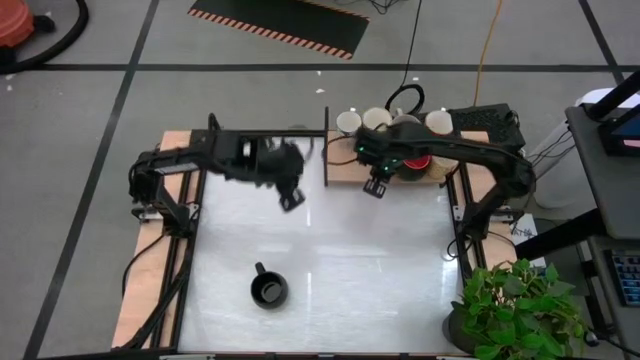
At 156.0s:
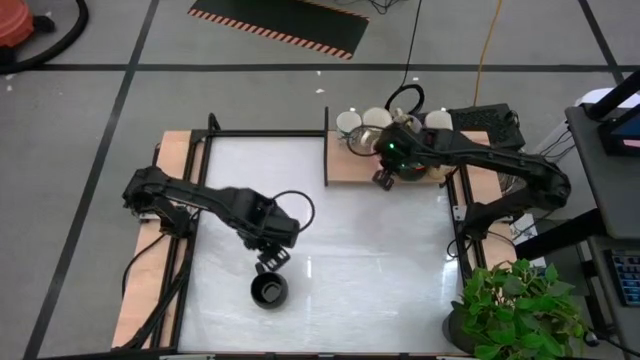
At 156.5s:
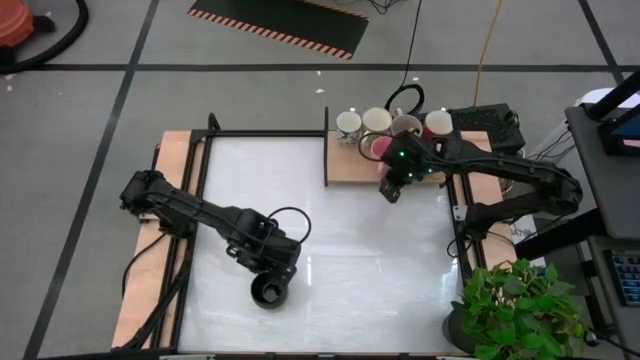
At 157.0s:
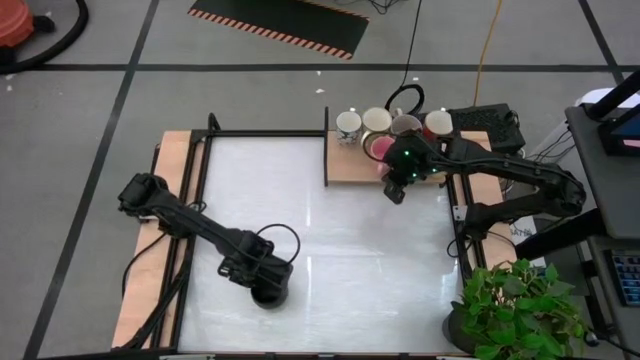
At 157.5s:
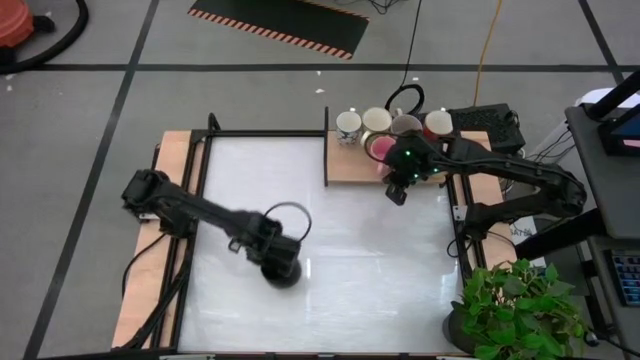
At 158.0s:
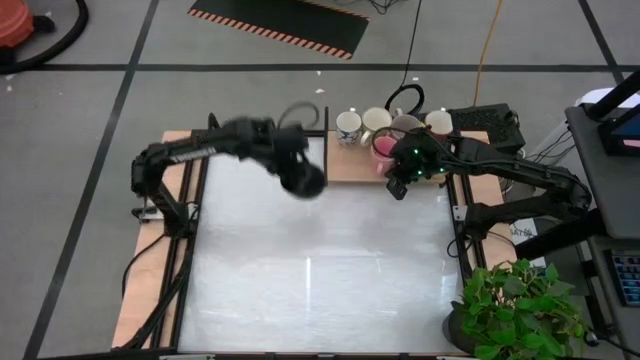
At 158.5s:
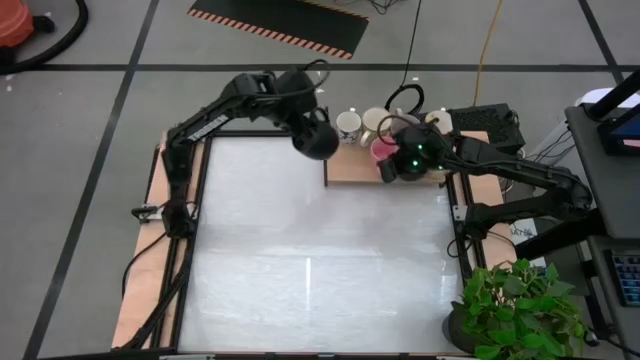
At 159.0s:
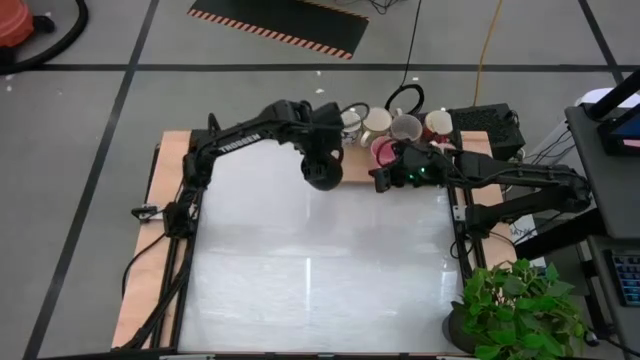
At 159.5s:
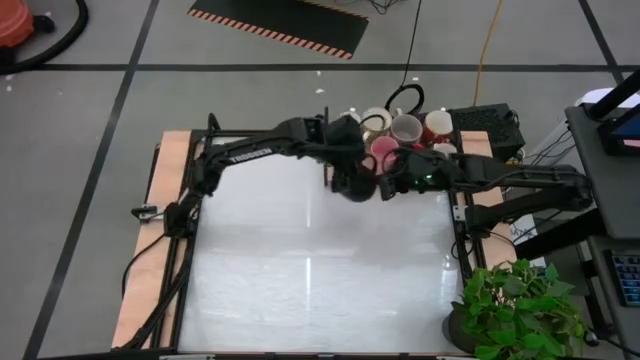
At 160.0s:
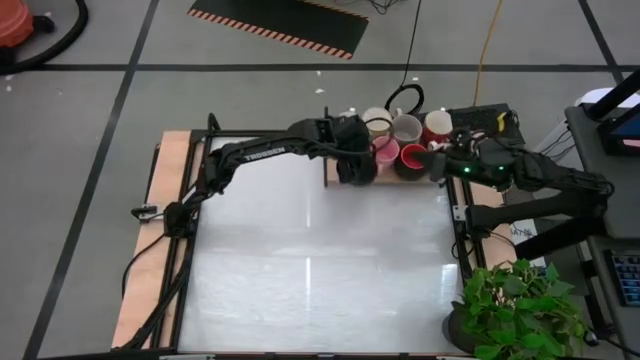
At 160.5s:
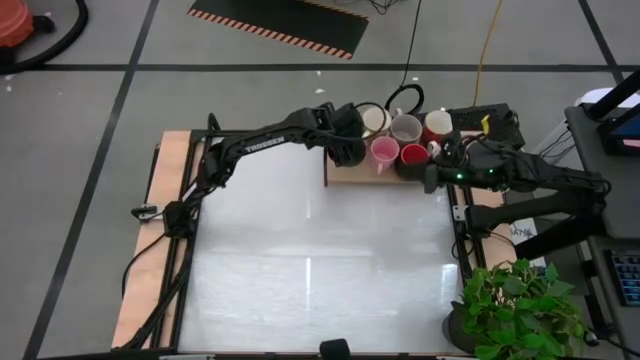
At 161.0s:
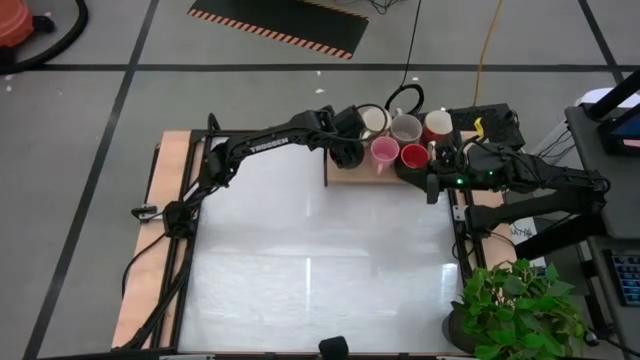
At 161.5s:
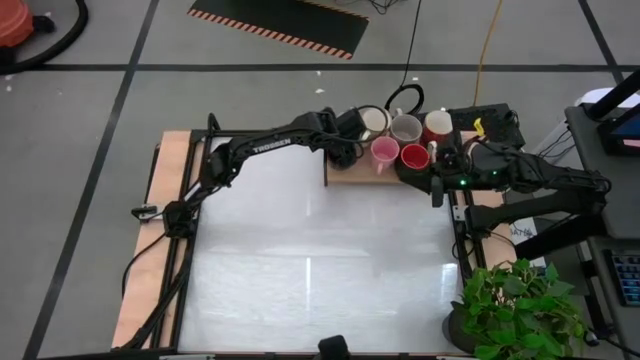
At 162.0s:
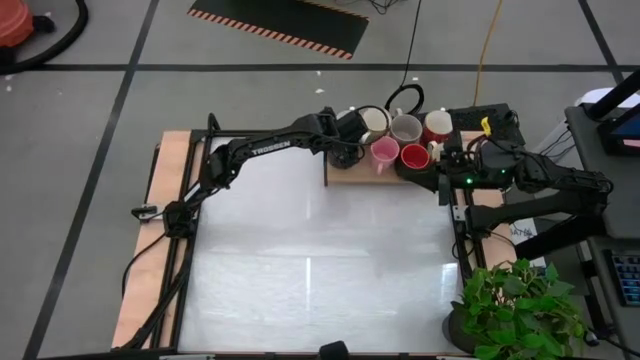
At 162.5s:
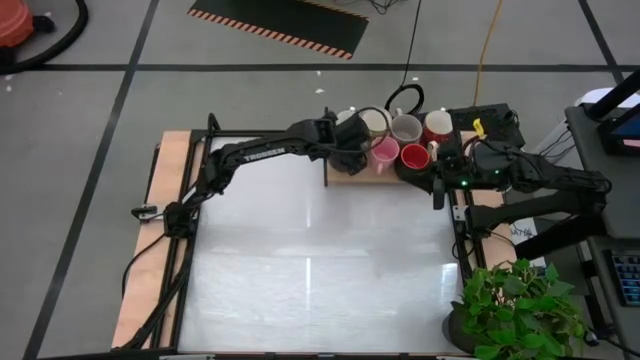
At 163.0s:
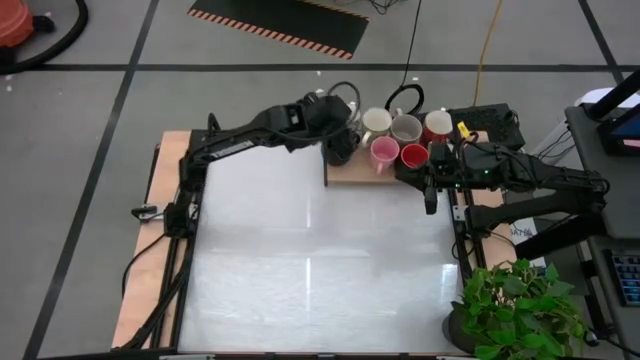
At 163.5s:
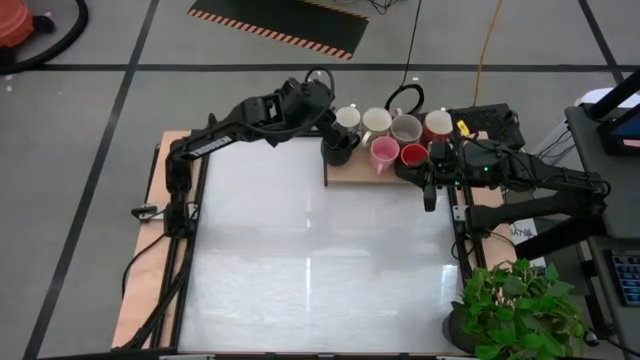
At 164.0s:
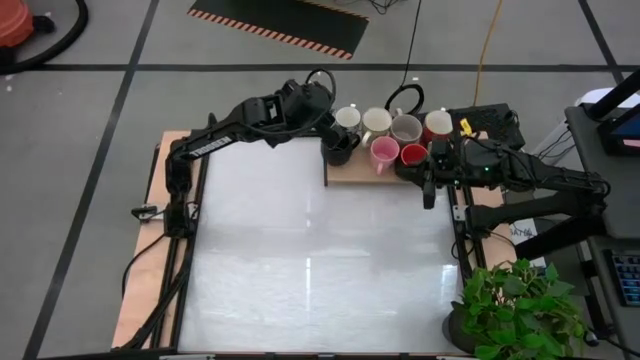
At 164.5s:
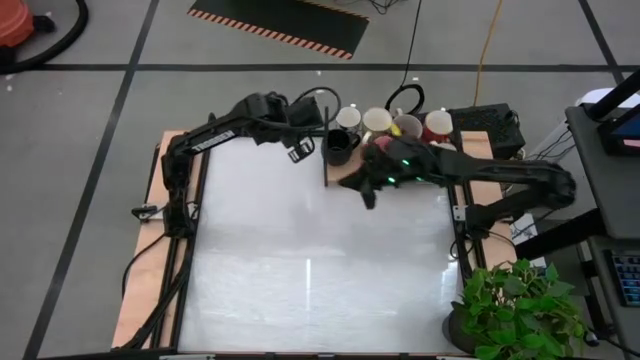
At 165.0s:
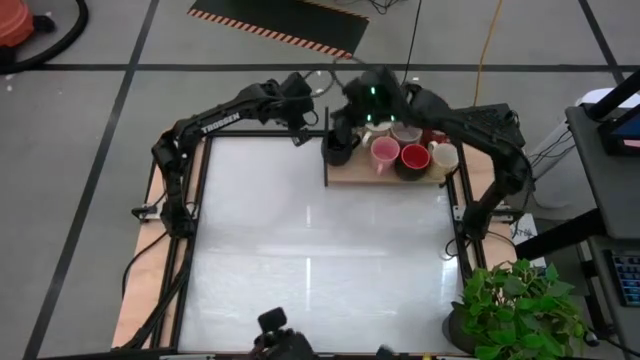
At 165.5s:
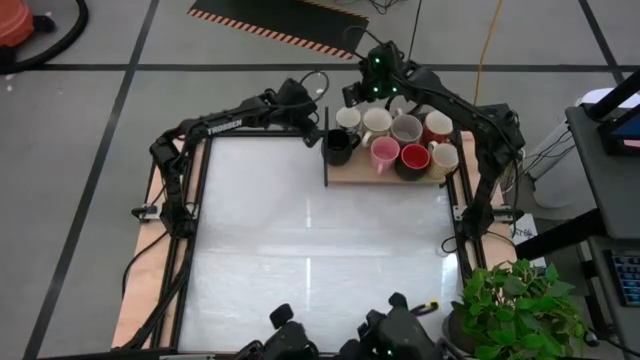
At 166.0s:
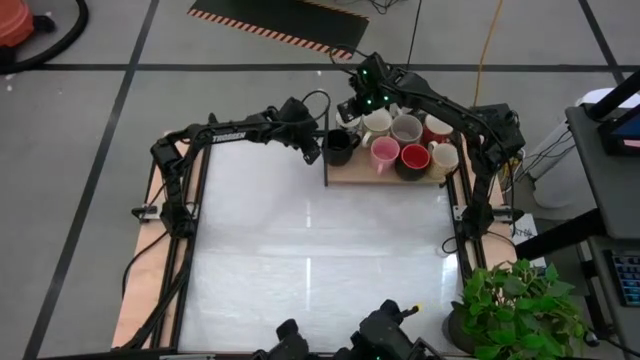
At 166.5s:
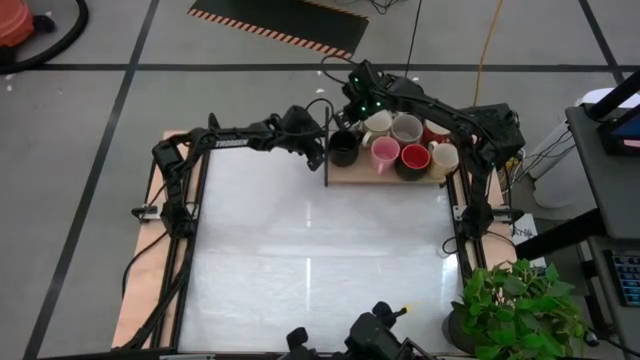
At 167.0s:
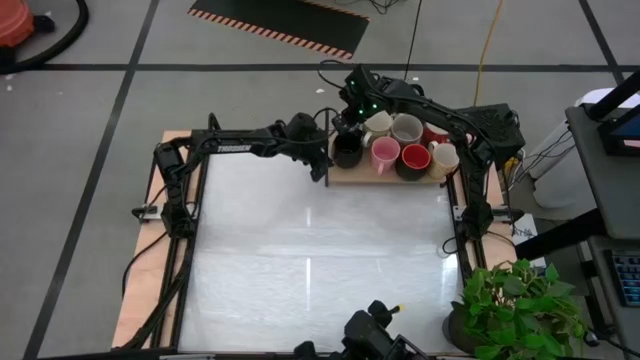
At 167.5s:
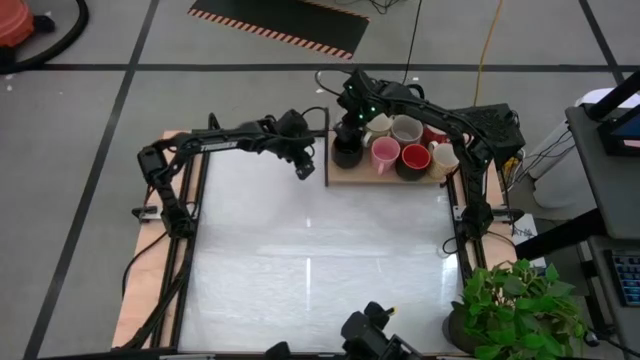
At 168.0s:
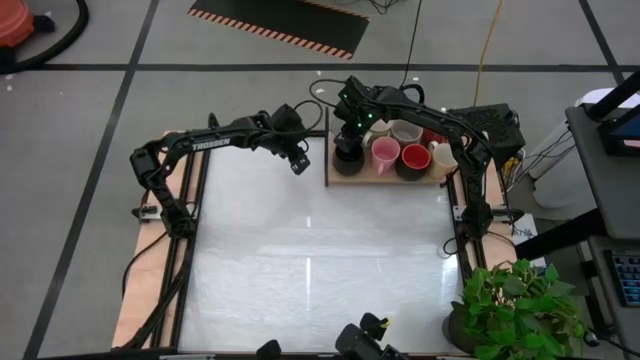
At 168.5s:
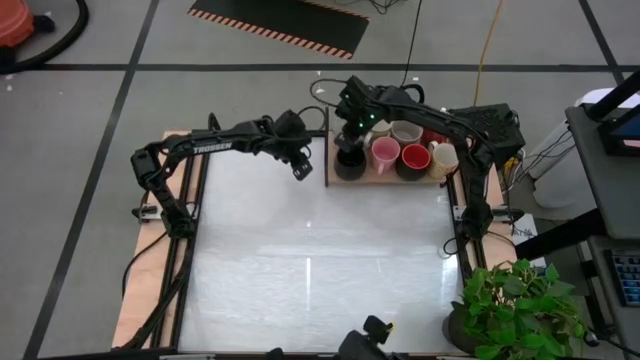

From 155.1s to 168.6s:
Task: Place coffee mugs
Put the black mug on the shelf

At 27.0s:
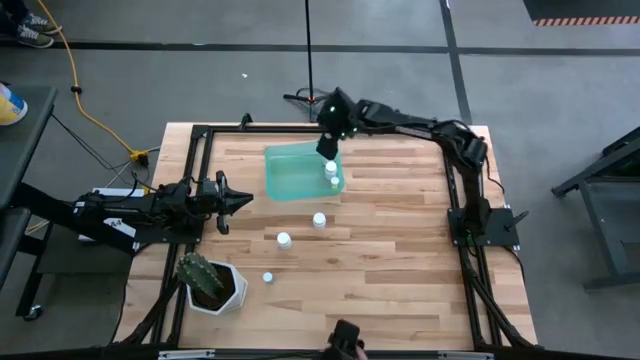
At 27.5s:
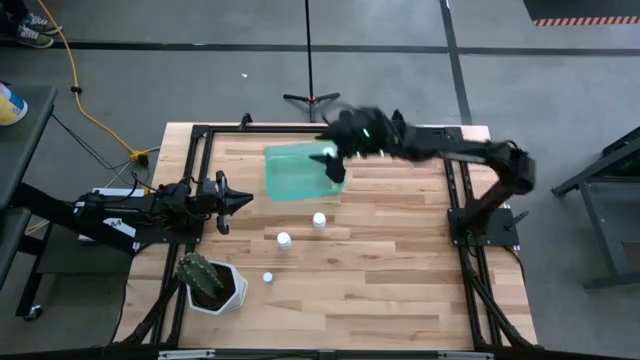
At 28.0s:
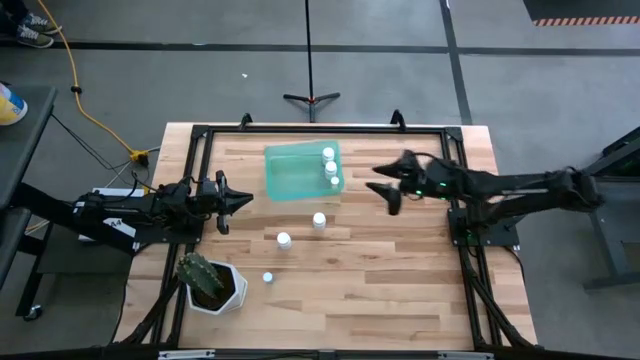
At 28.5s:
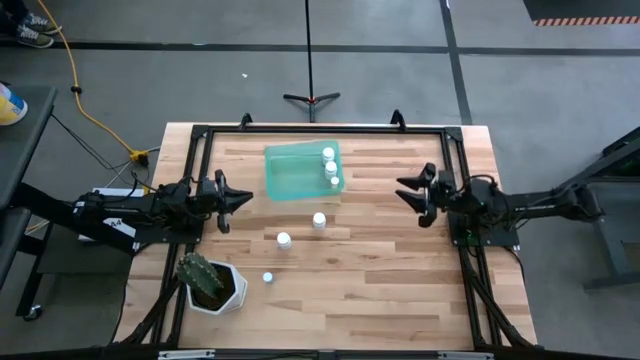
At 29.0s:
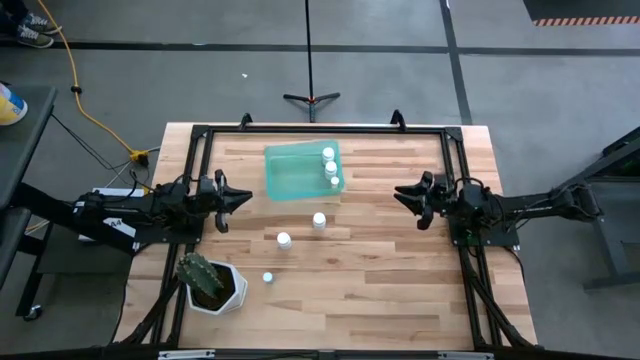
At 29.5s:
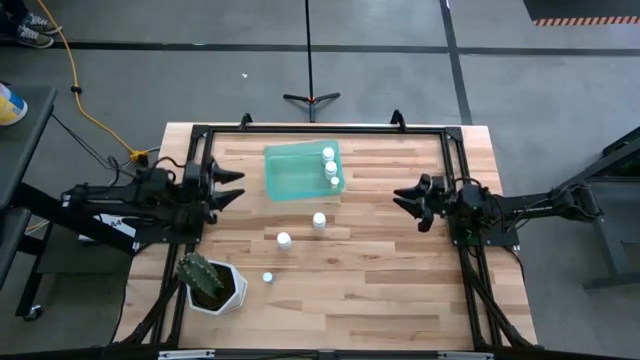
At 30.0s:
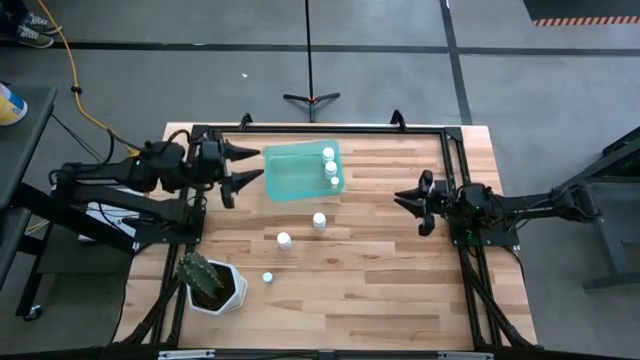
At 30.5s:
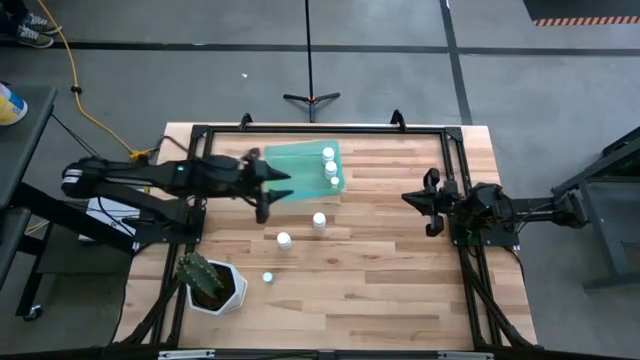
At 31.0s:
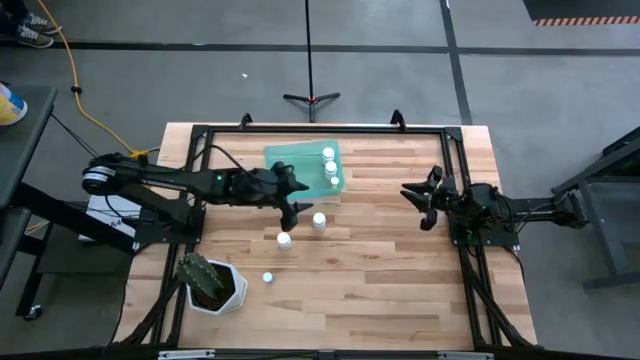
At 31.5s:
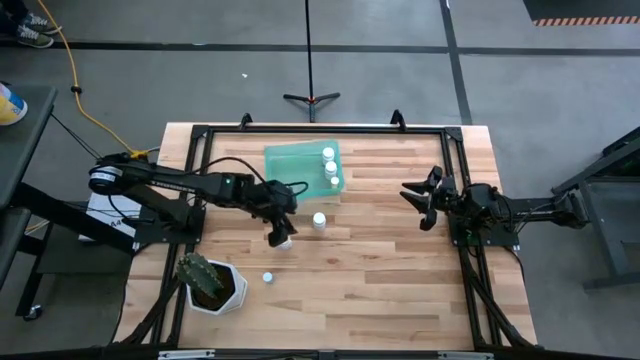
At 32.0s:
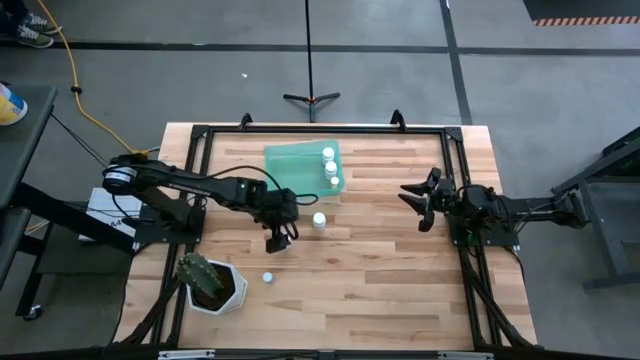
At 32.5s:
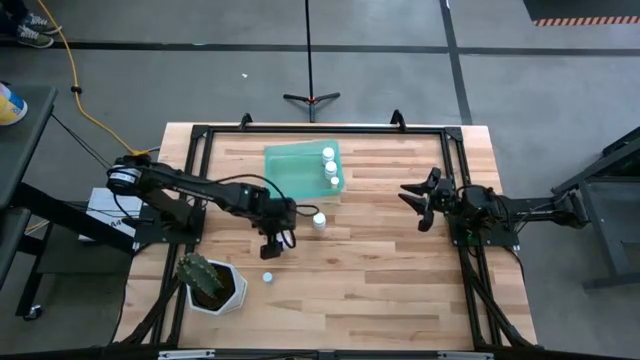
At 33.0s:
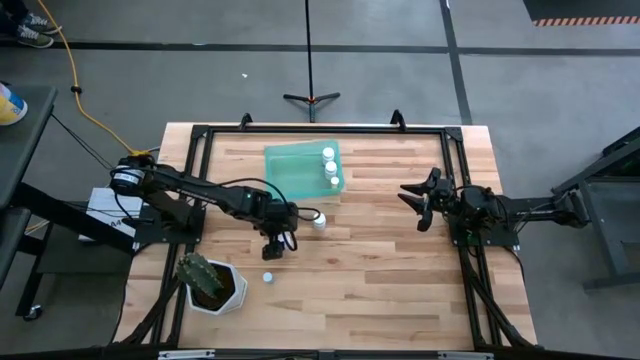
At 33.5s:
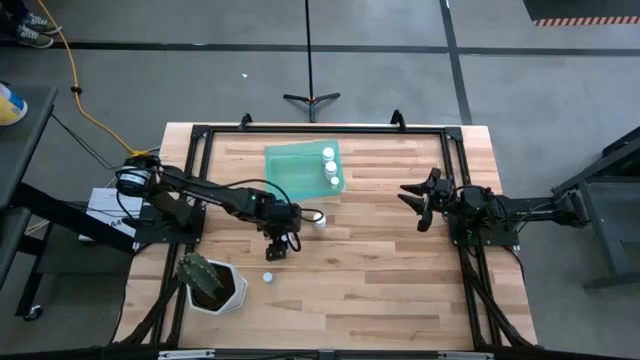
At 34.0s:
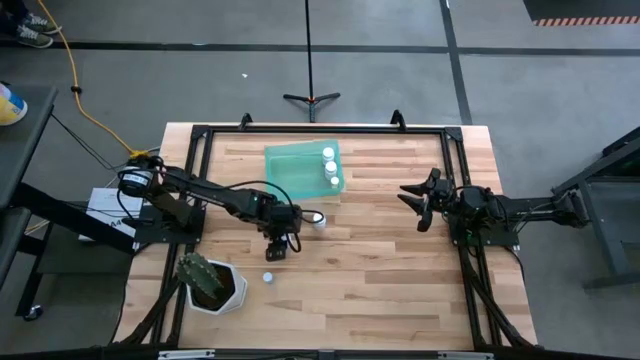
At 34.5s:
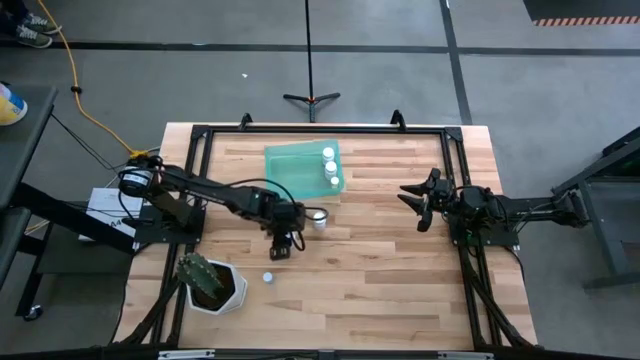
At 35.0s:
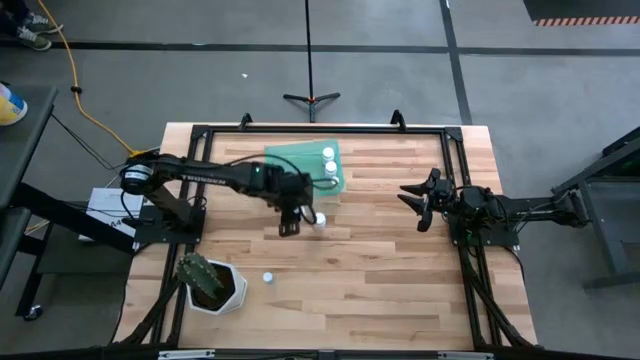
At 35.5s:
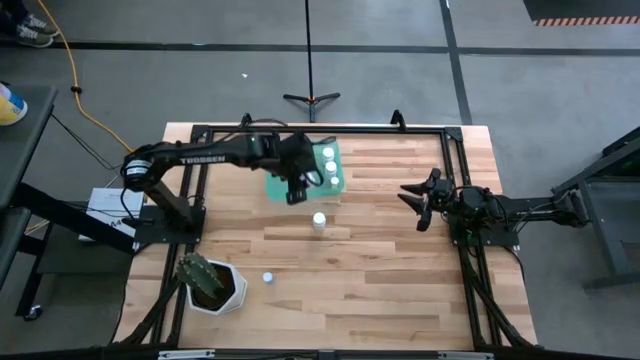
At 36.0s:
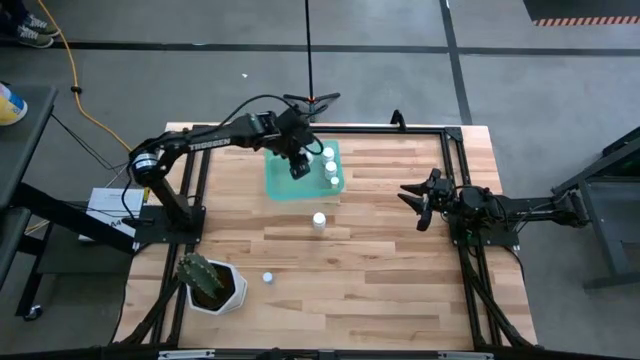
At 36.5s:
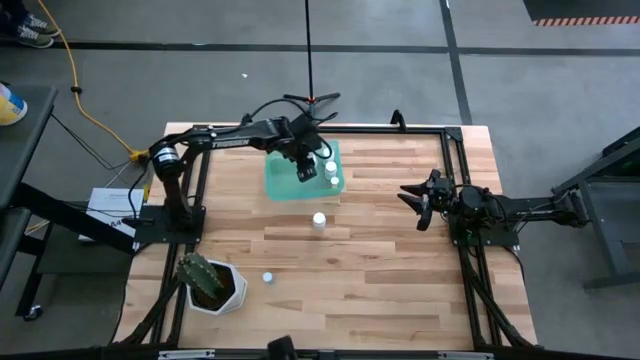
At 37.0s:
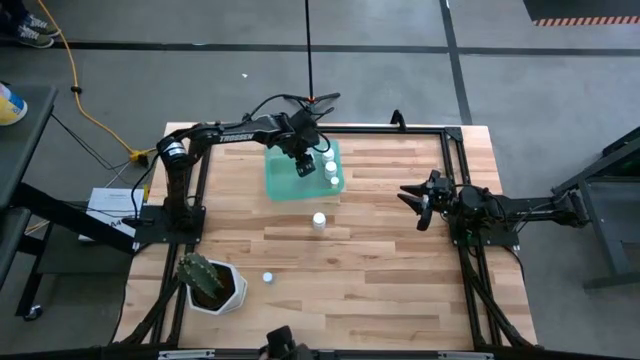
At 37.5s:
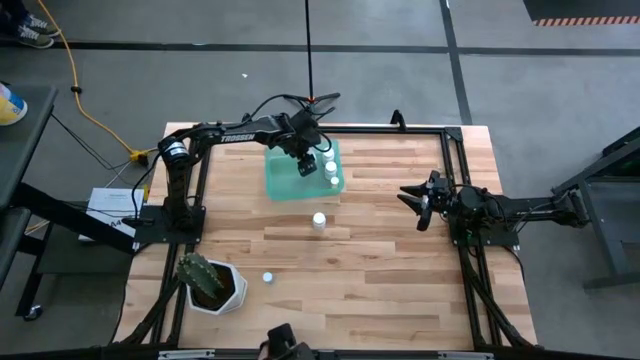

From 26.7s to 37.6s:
Task: Pick and place pill bottles into a basket
Put the white pill bottle into the green bin
